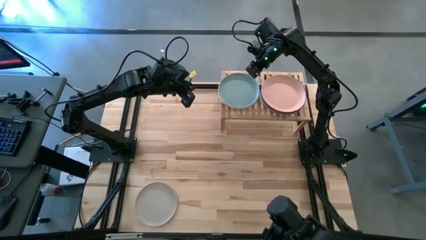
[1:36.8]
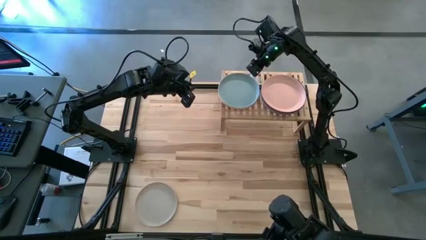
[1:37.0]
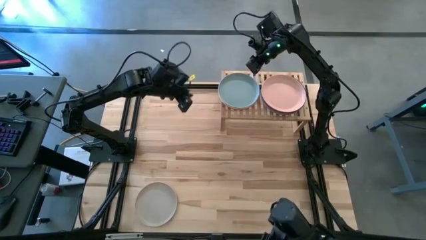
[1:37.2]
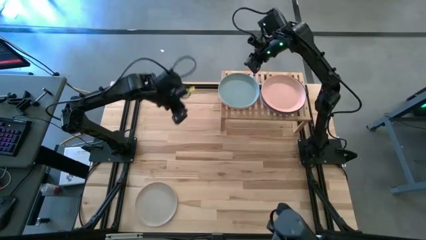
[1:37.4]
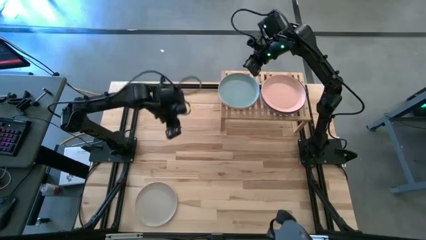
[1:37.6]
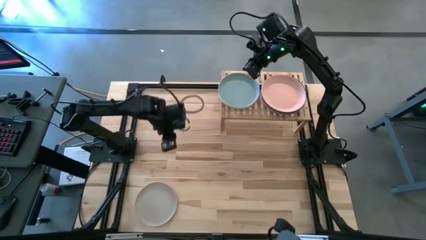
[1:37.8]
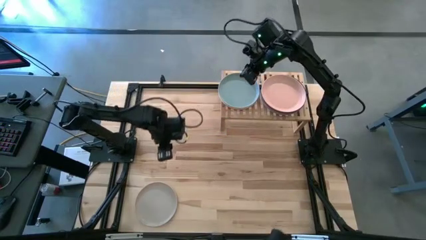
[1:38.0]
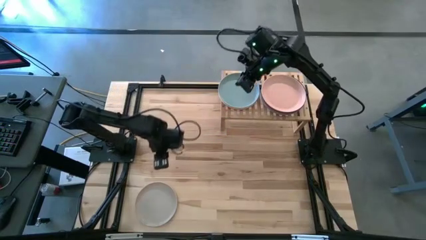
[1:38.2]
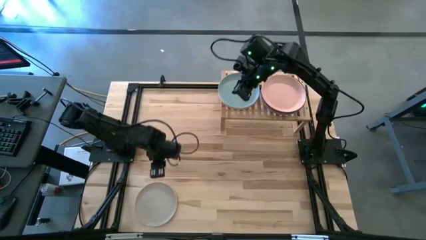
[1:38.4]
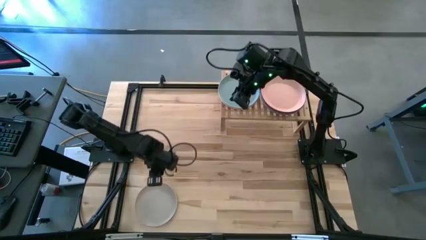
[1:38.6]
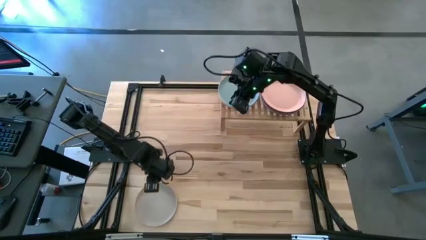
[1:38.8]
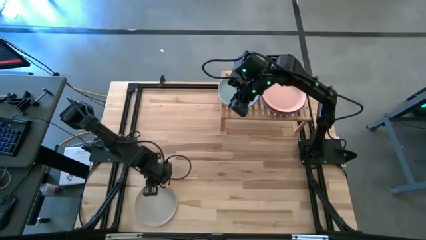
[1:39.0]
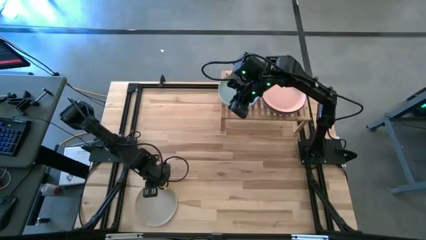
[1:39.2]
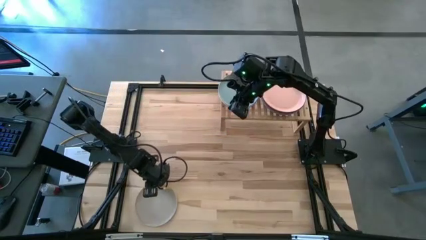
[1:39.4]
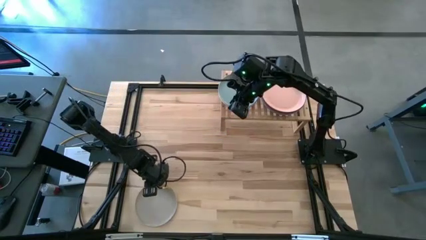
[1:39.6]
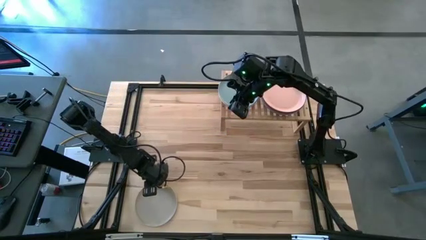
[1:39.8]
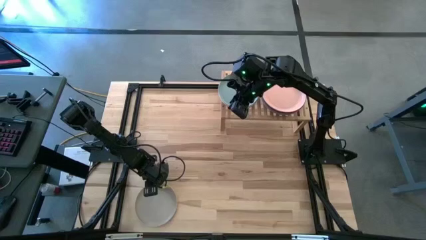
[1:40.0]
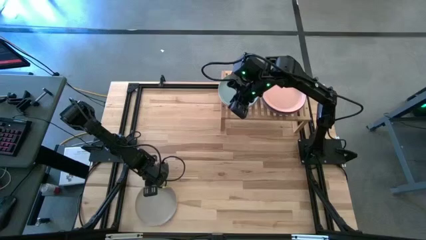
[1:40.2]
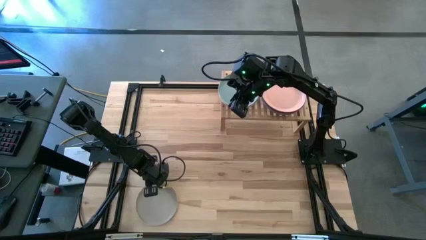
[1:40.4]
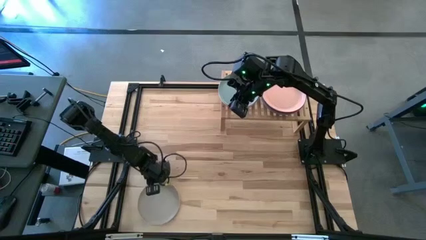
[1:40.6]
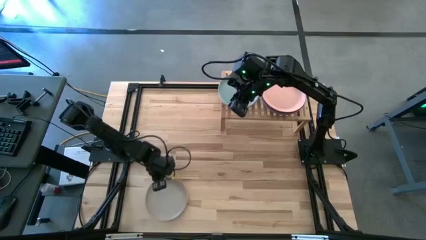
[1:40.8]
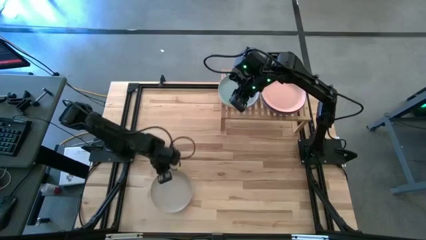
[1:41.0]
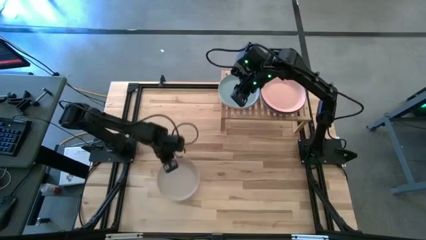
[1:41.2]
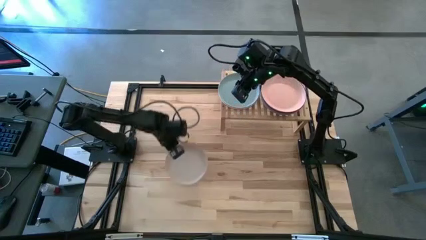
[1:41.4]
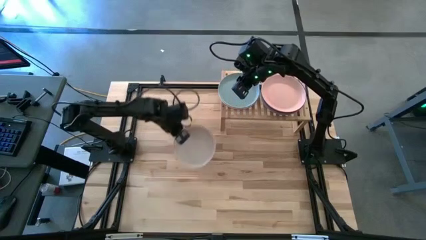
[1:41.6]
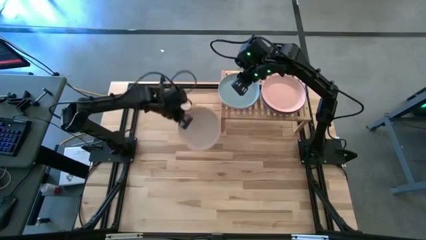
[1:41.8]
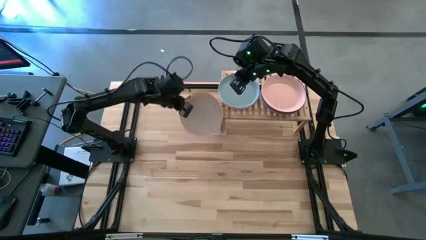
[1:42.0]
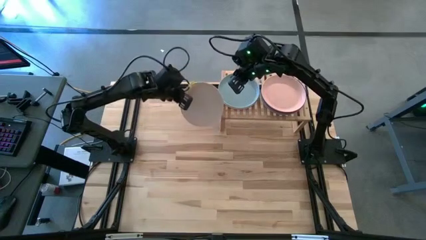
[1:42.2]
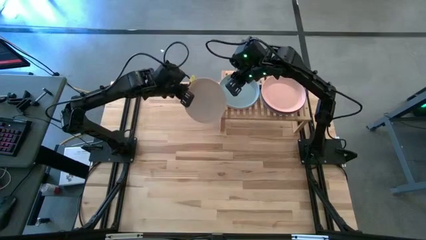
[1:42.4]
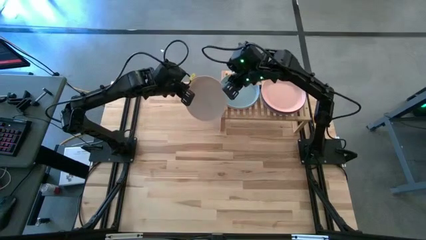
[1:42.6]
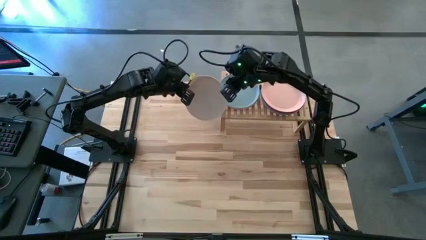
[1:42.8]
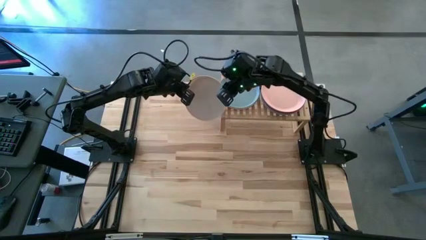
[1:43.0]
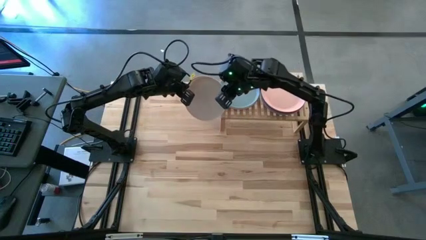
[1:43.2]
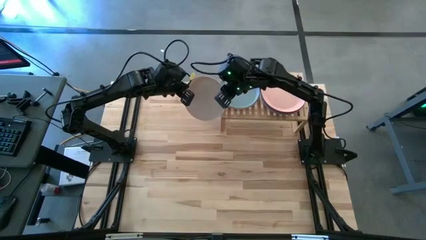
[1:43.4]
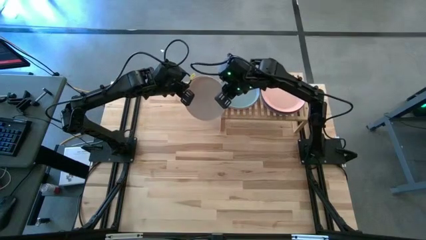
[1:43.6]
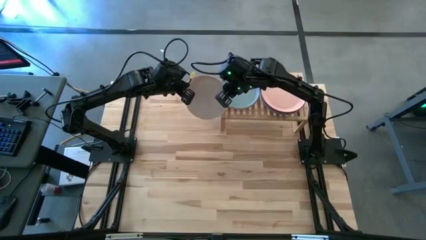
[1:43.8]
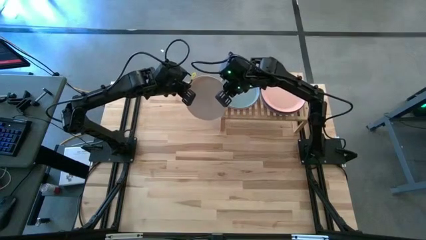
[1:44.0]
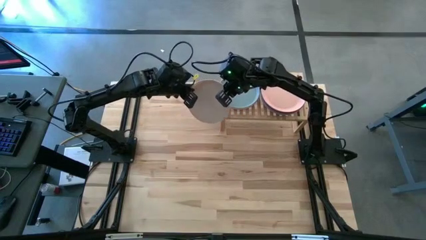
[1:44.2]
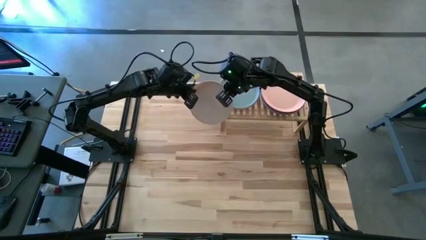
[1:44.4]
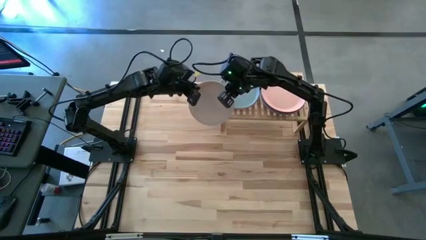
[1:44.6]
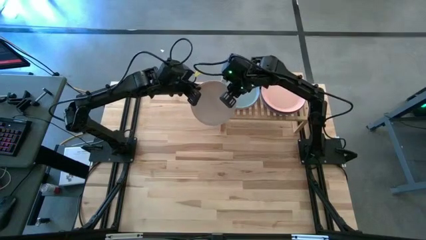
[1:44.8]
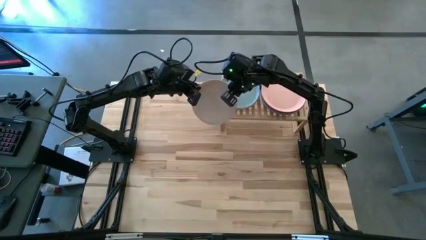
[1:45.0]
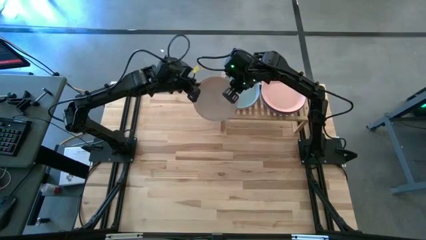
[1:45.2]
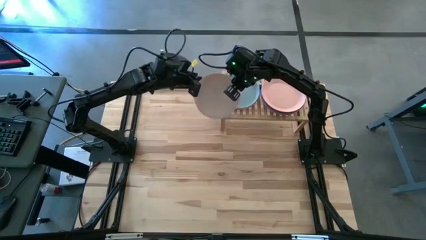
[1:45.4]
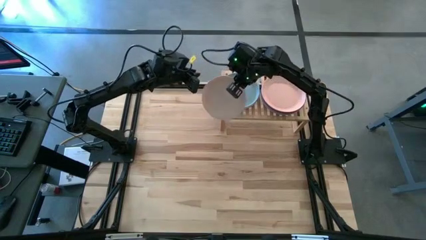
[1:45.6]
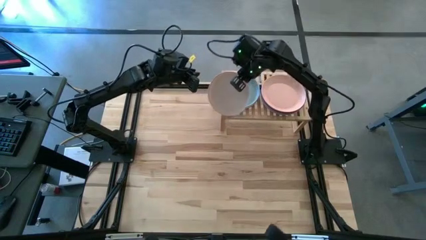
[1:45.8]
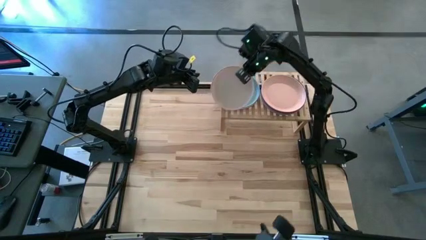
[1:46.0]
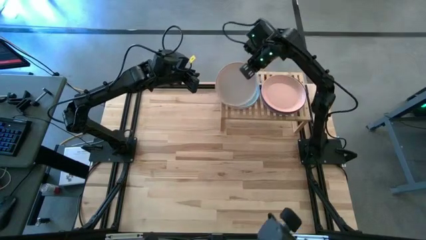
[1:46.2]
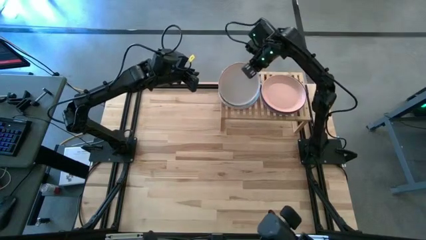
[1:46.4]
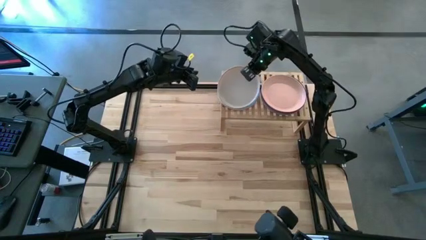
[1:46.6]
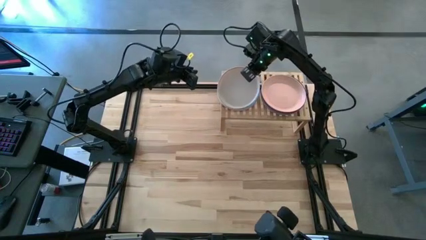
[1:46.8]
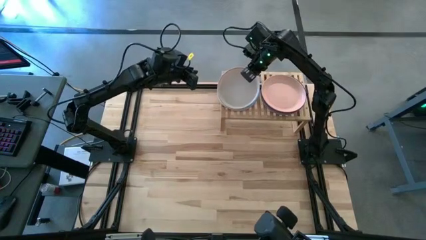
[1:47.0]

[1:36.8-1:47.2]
Task: Place and stack plates onto a shelf
Stack the gray plate on the light blue plate on the shelf

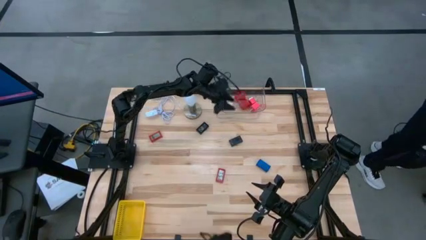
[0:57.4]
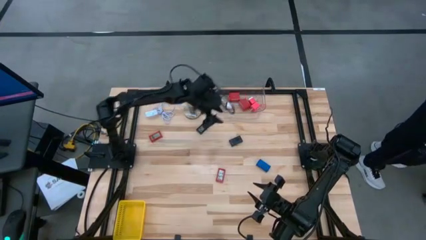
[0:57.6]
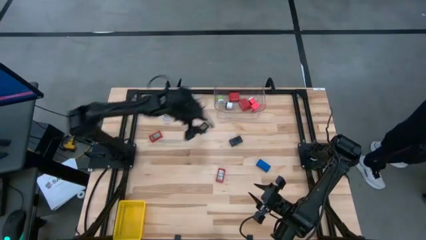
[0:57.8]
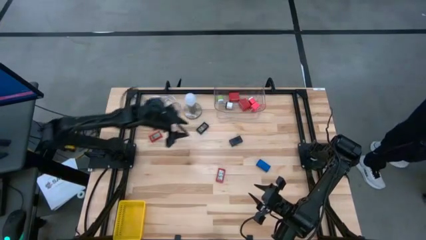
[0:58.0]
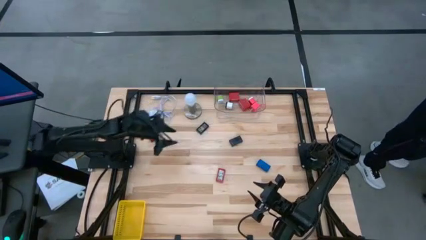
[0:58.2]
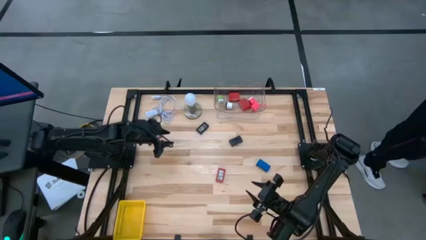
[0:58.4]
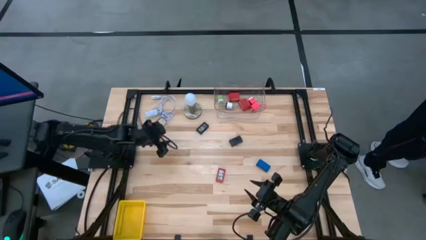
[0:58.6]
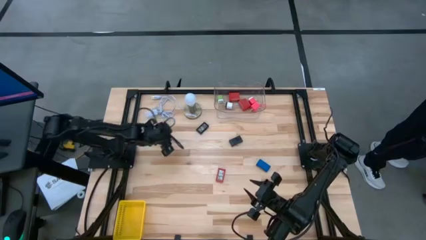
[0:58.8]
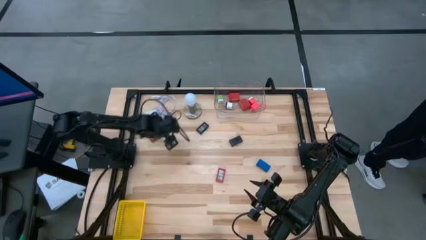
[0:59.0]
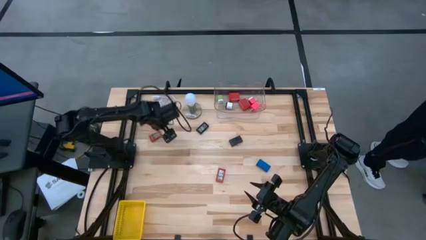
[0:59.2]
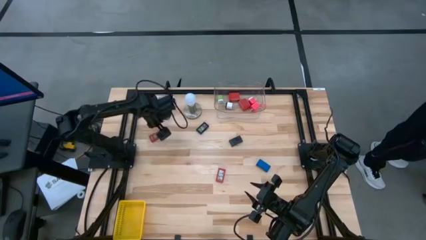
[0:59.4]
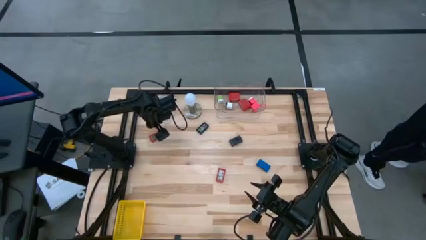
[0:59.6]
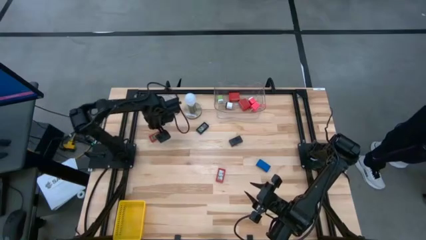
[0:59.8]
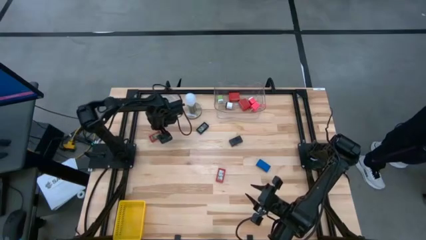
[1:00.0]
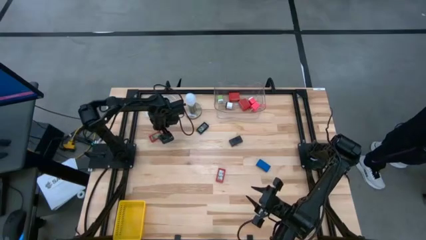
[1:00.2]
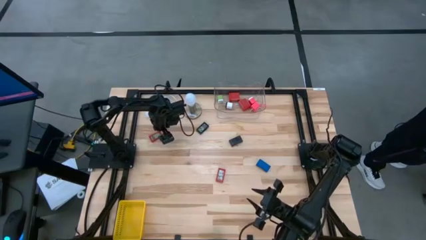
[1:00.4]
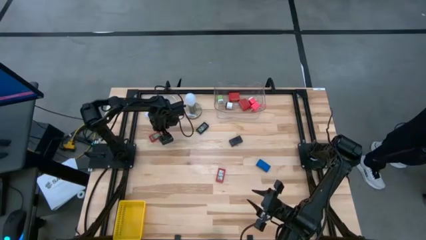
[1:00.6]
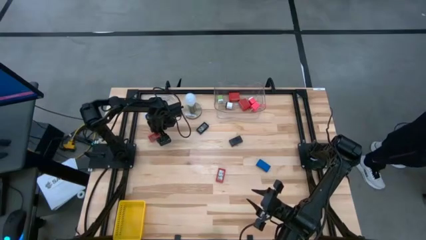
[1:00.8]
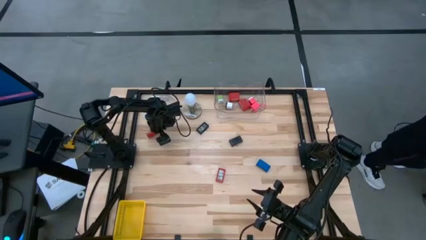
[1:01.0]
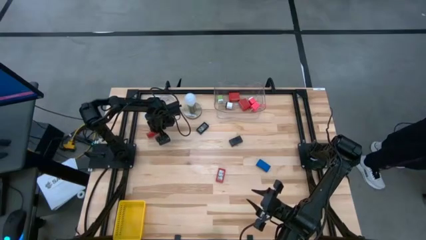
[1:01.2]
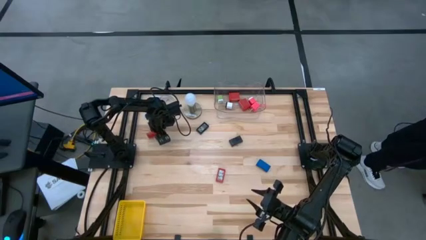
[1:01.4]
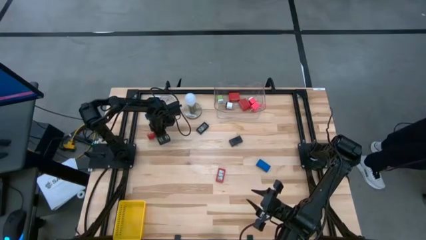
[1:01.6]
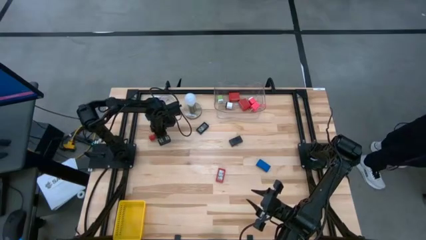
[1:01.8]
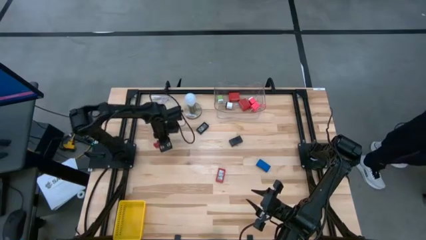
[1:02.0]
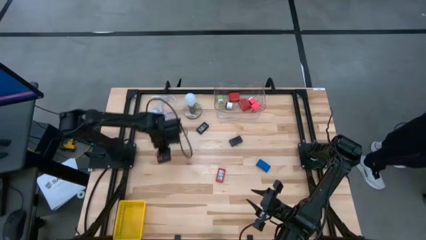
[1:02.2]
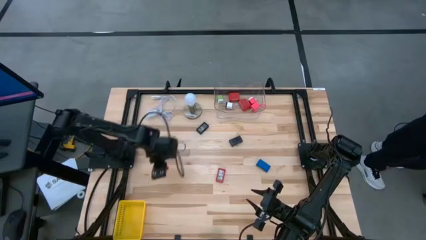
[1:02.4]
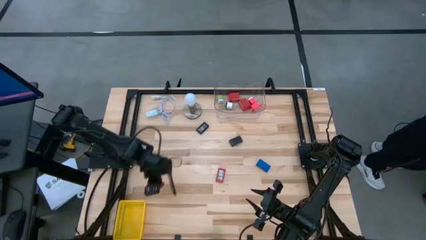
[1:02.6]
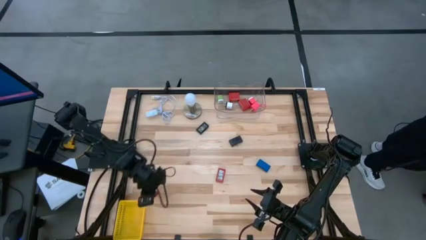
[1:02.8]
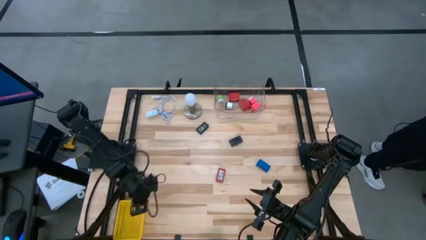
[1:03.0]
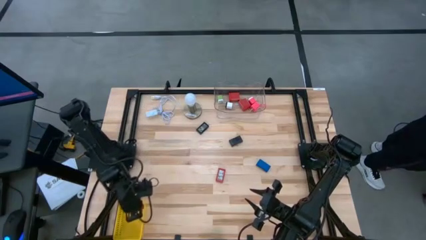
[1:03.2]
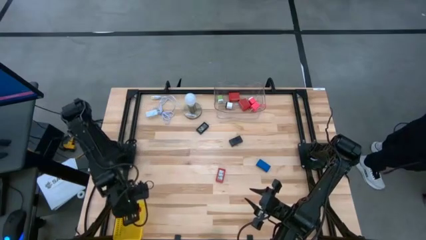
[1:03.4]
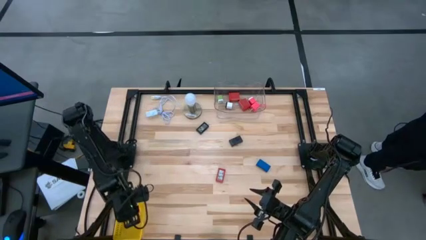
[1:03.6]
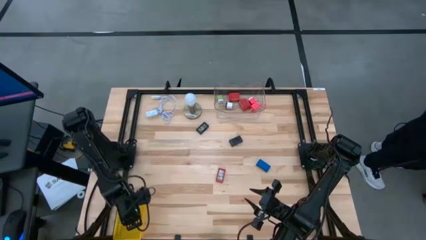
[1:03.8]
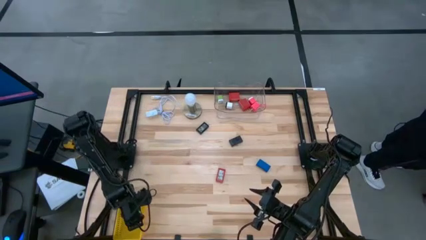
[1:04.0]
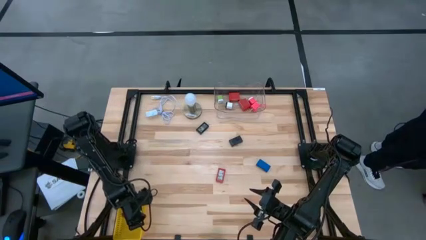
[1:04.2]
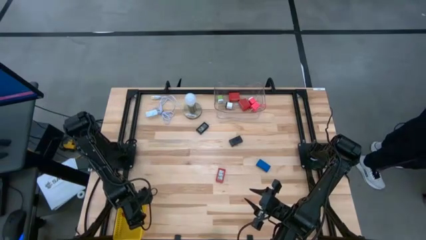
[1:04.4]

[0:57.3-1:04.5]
Task: Pick & Place Office items
Put the top red digital clock into the yellow basket
